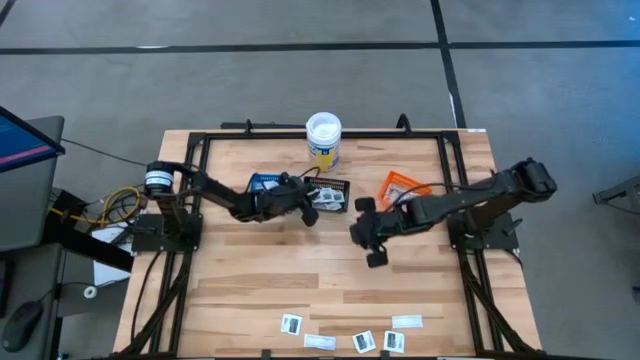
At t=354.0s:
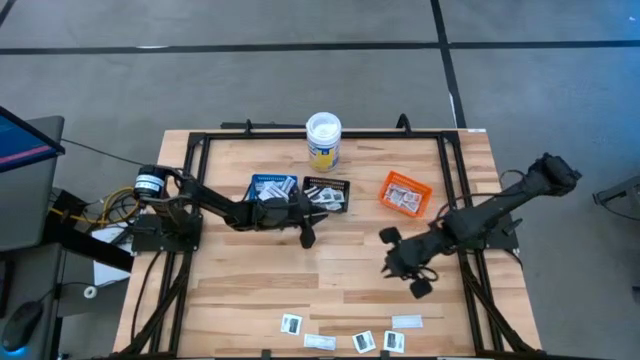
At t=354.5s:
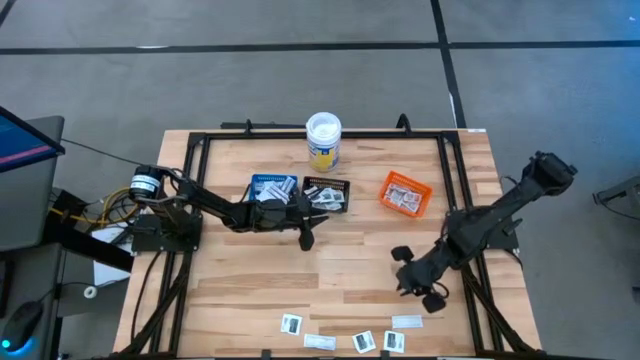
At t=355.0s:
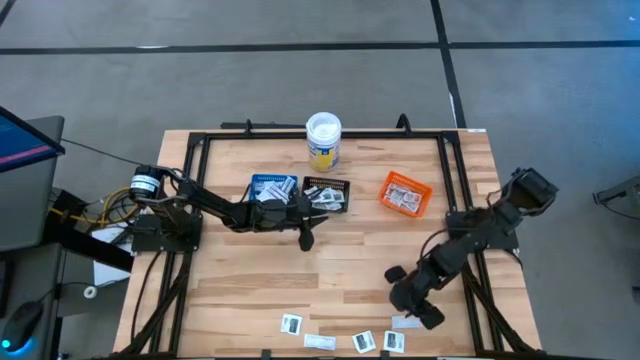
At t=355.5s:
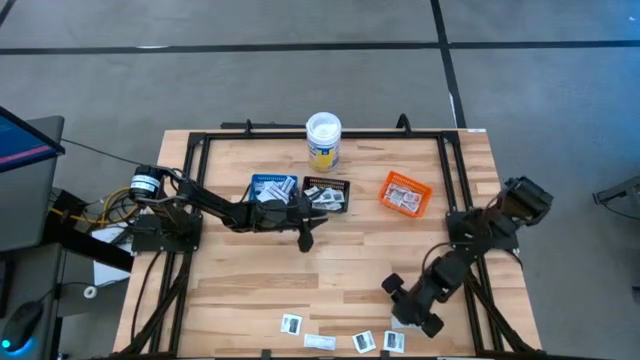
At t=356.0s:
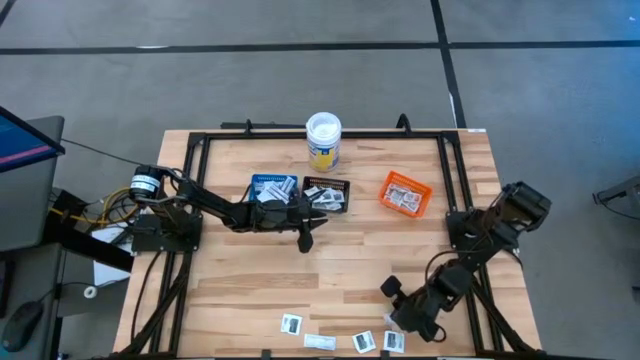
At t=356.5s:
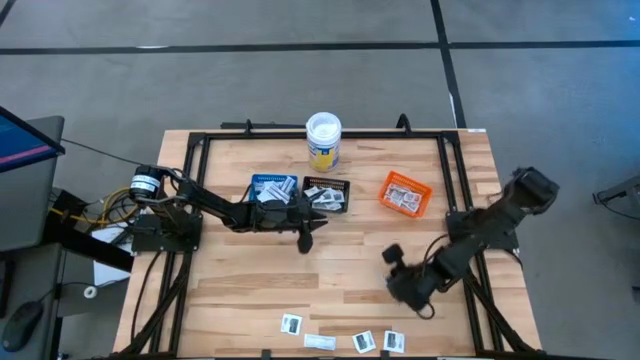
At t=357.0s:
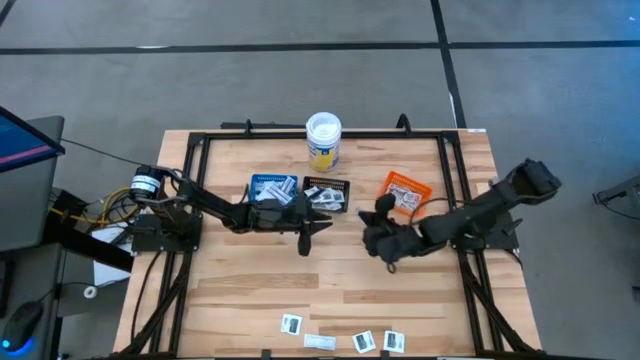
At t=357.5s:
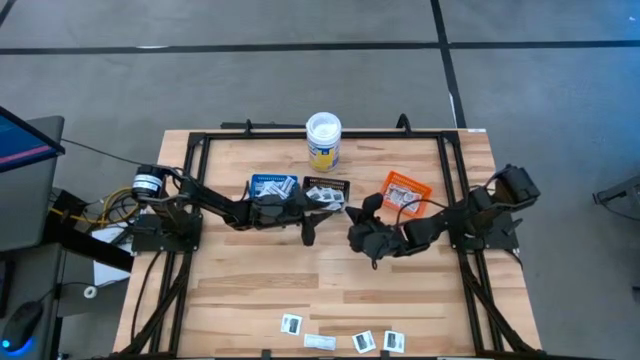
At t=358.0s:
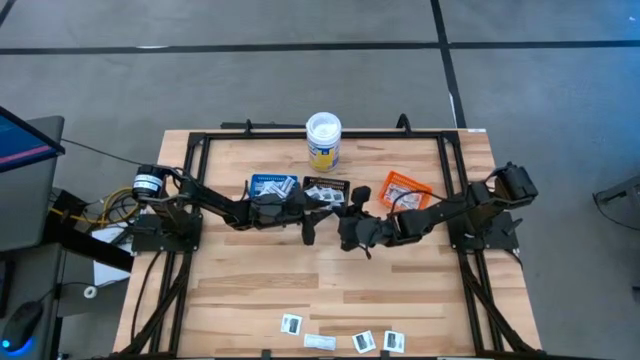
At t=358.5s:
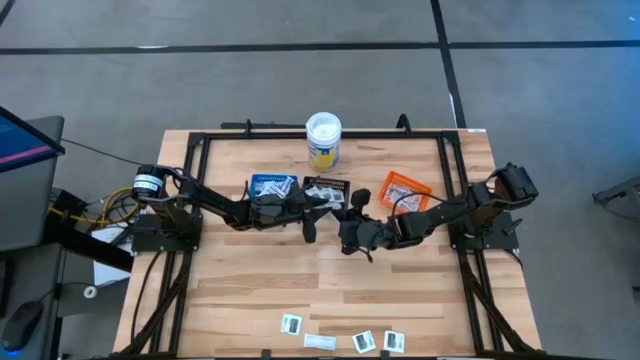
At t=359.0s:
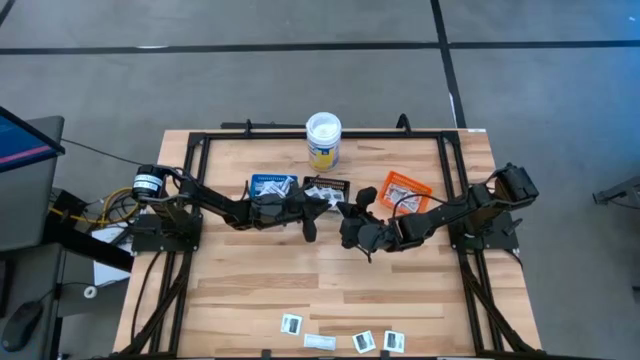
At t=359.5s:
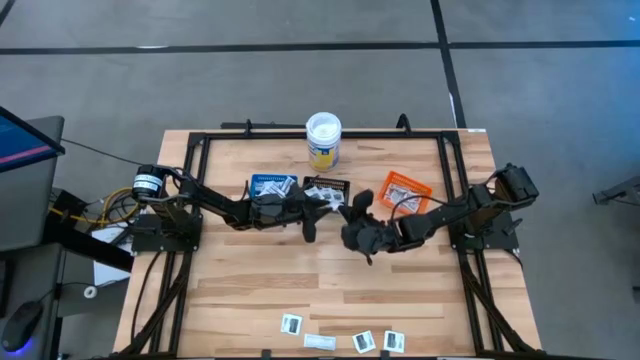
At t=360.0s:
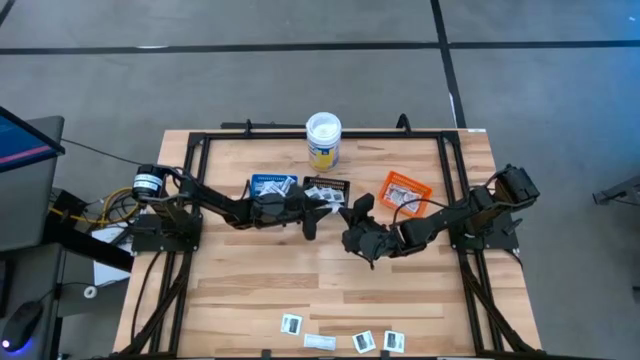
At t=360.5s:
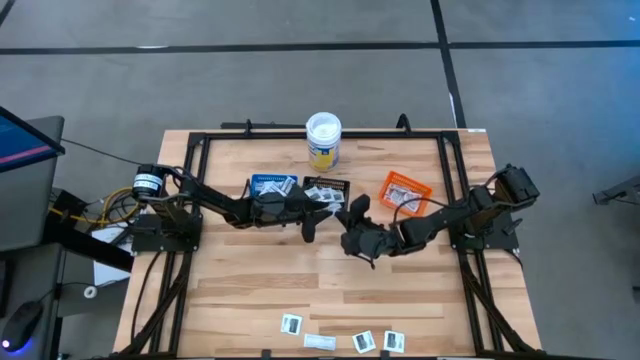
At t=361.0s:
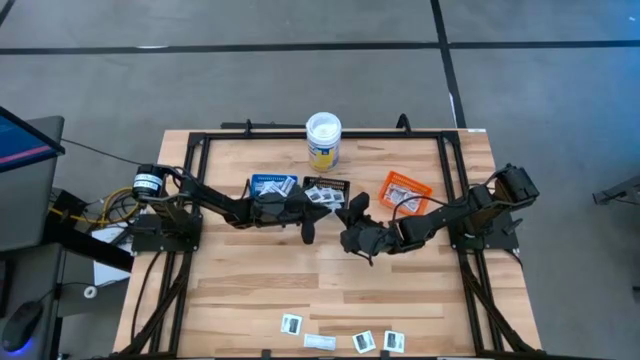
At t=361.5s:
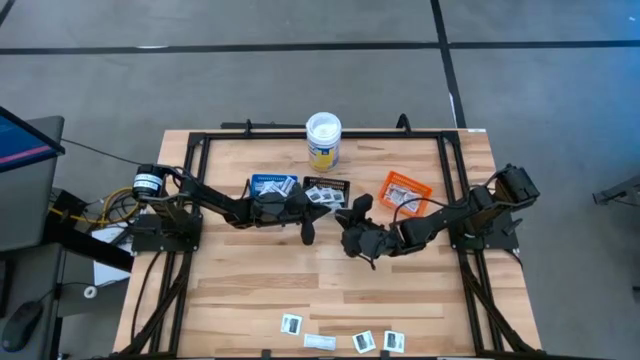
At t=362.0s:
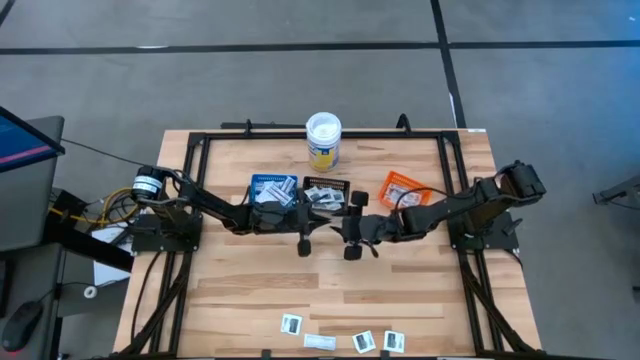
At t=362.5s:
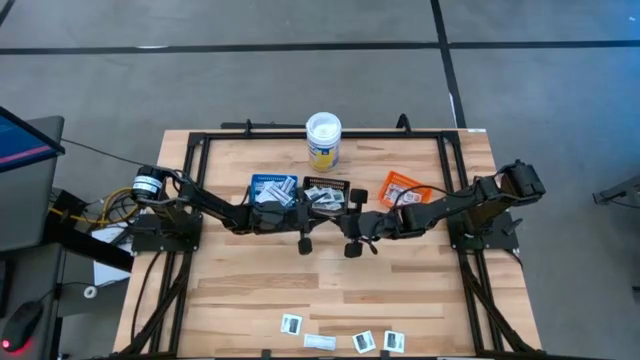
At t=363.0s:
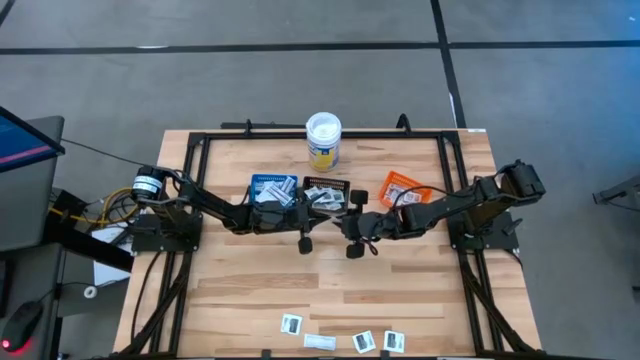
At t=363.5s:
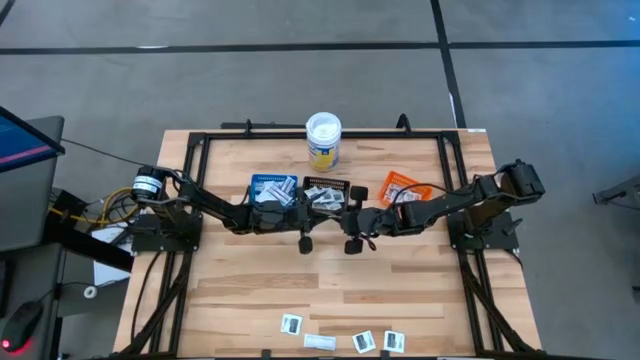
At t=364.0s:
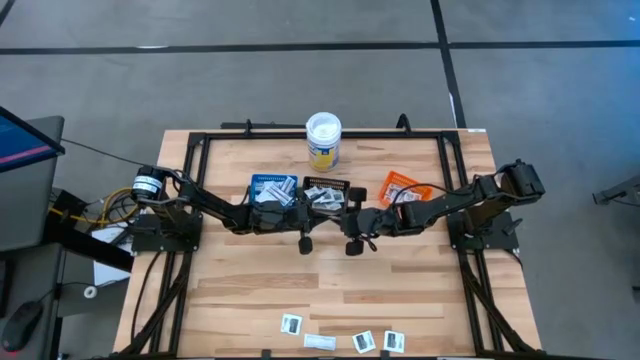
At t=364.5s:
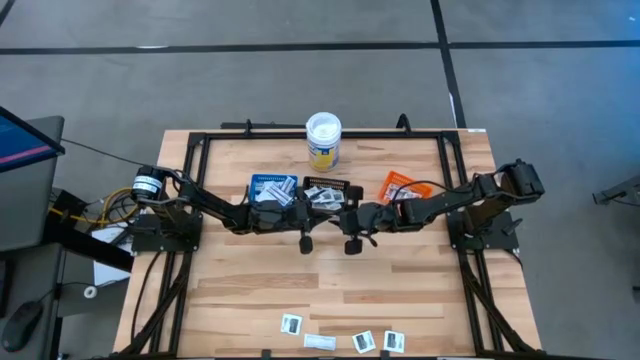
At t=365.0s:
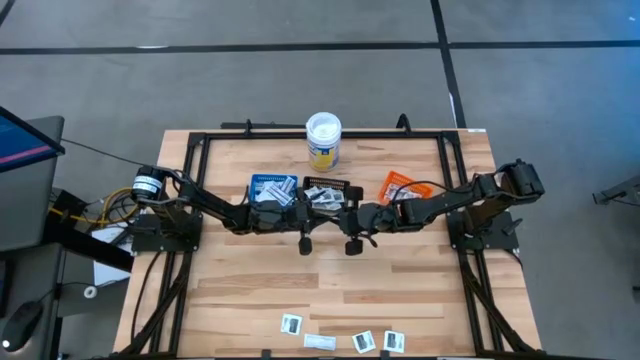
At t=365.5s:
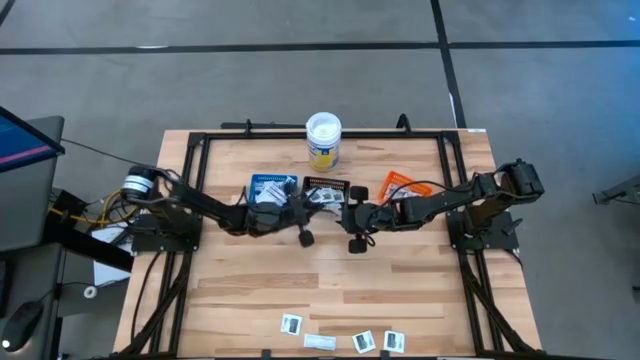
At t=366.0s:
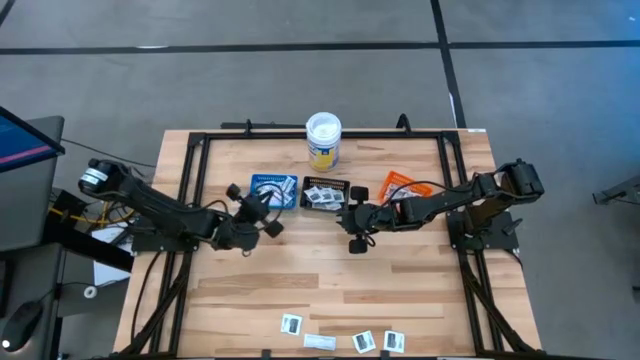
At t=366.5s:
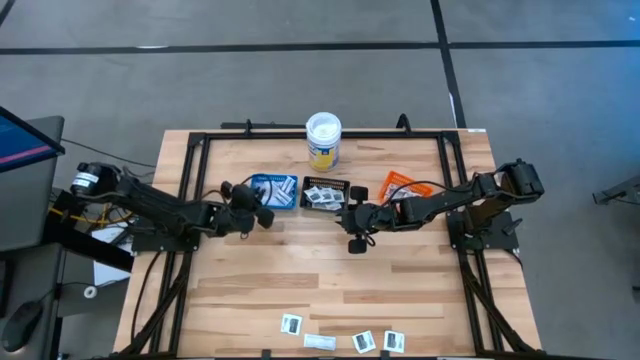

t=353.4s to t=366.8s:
Task: Pick & Place First Aid Supplies
Put the blue bandage into the blue bin

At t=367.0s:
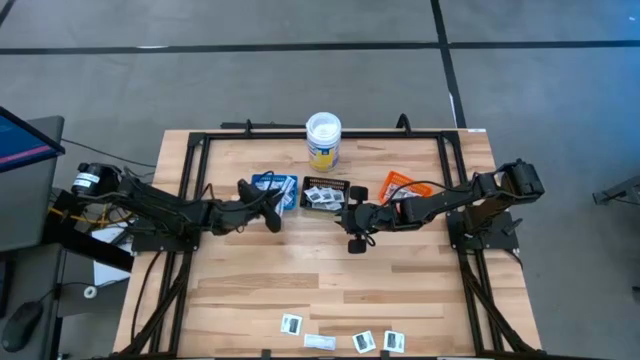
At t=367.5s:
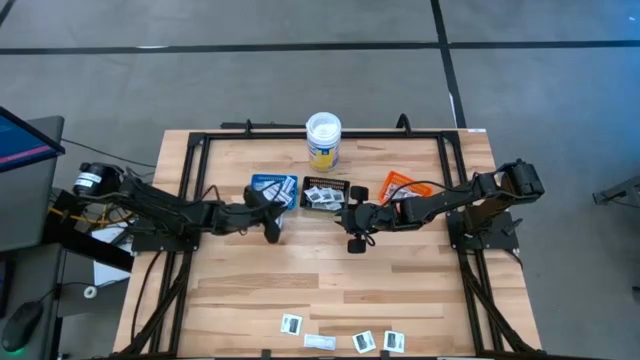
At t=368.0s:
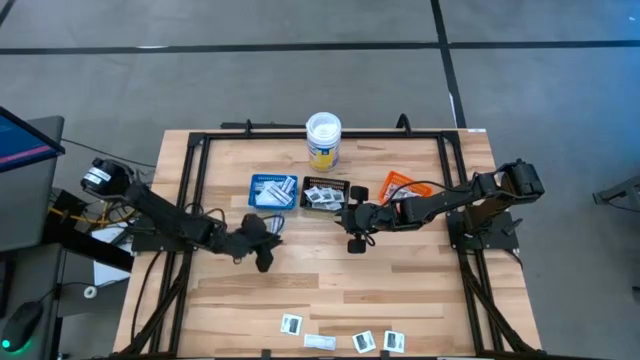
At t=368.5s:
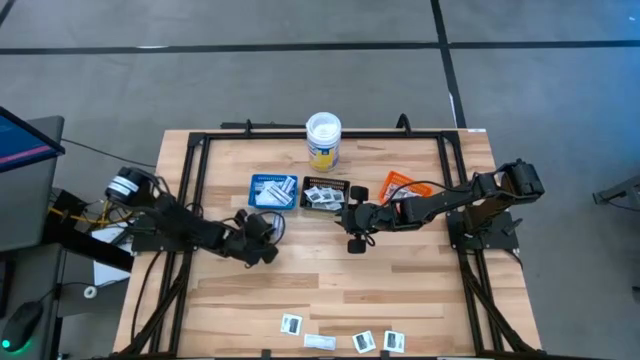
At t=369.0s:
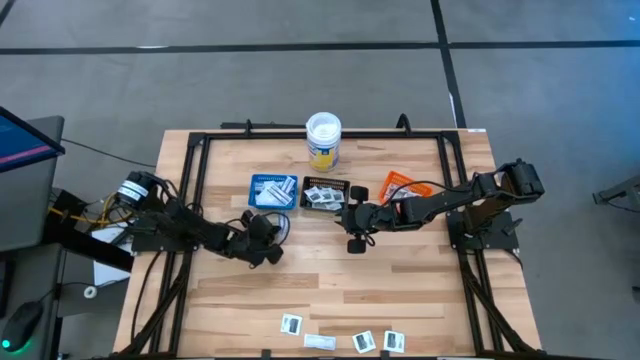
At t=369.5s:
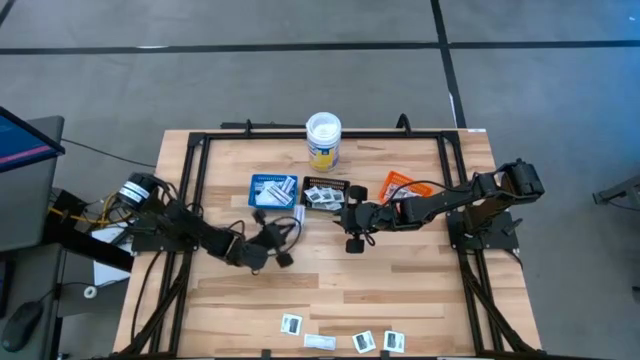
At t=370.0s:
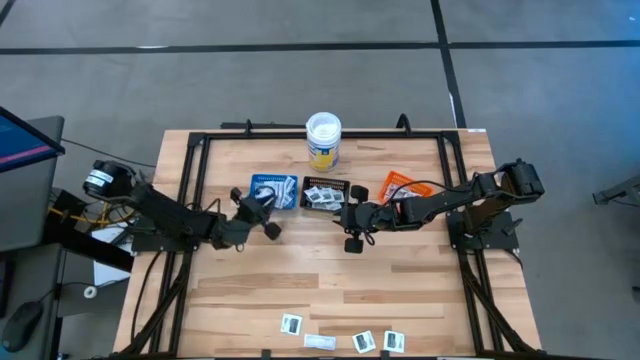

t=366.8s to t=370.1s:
Put the blue bandage into the blue bin

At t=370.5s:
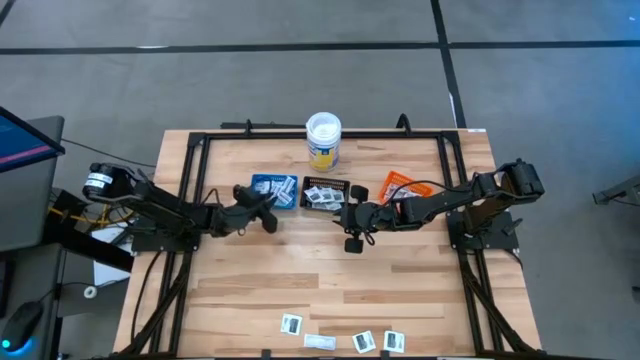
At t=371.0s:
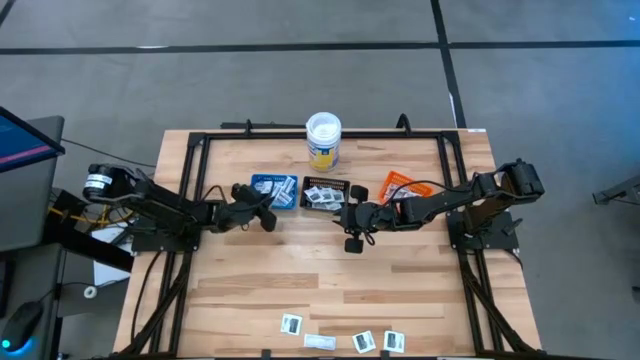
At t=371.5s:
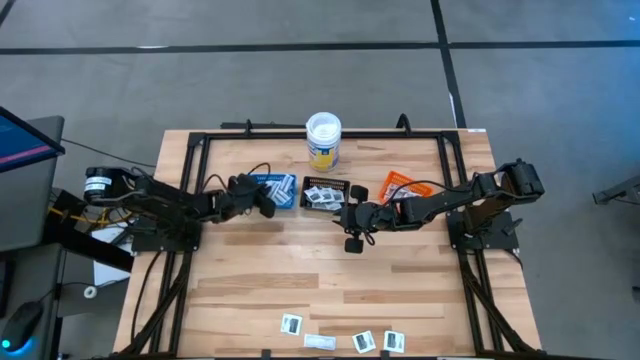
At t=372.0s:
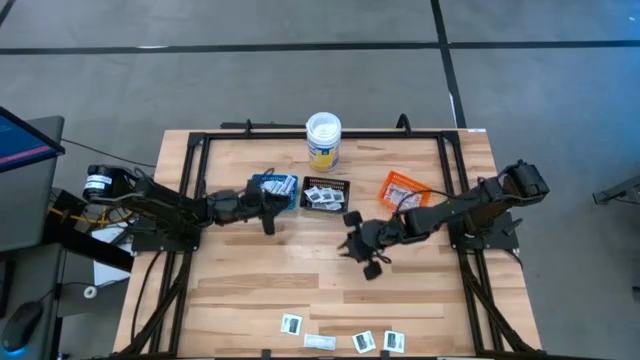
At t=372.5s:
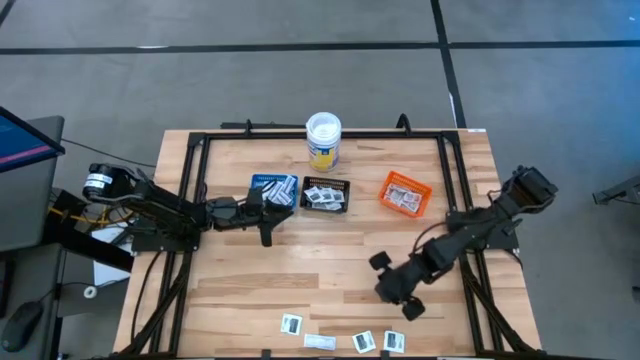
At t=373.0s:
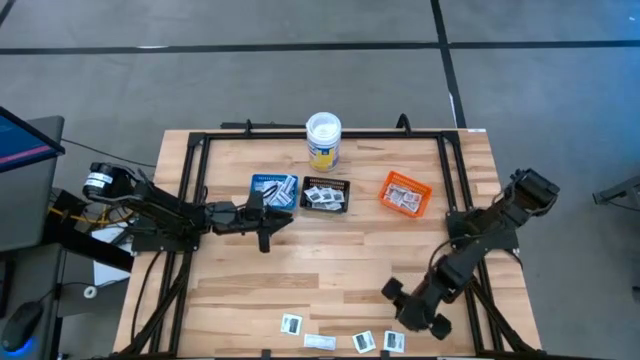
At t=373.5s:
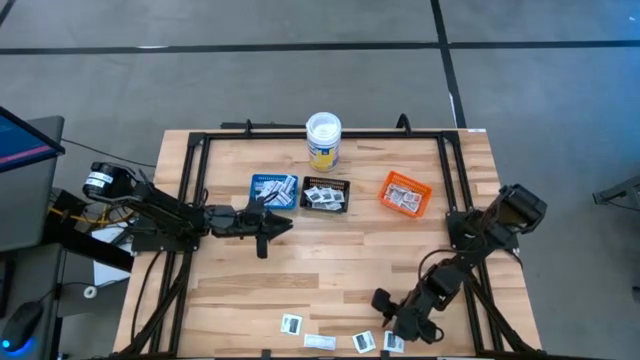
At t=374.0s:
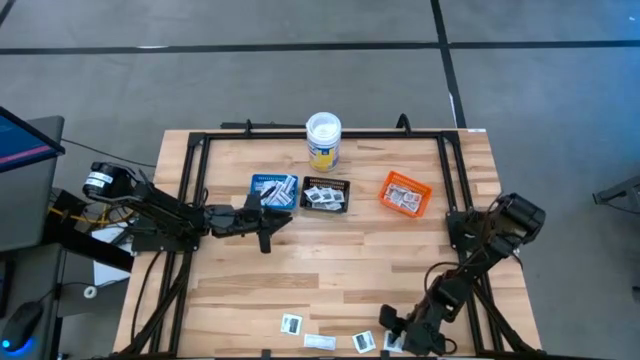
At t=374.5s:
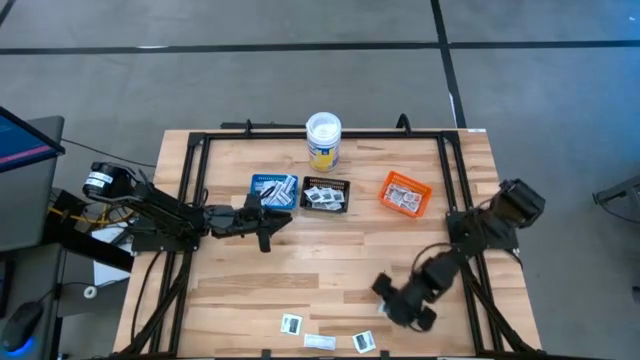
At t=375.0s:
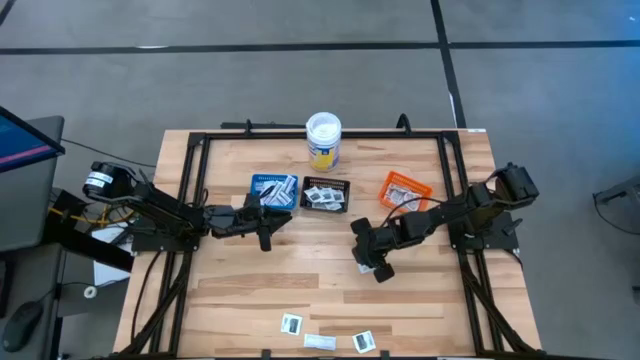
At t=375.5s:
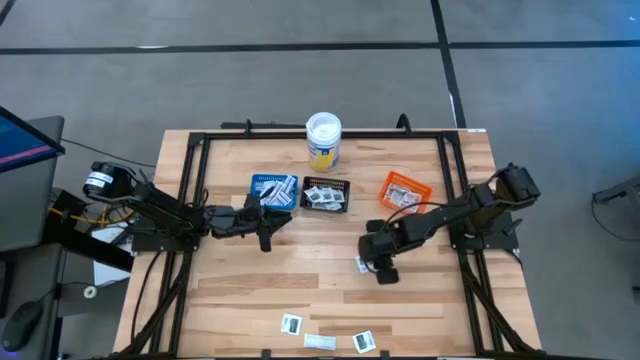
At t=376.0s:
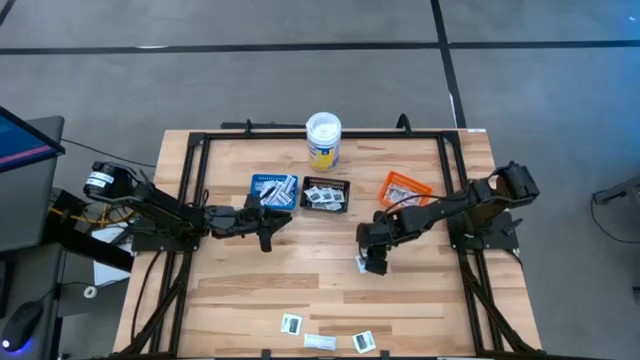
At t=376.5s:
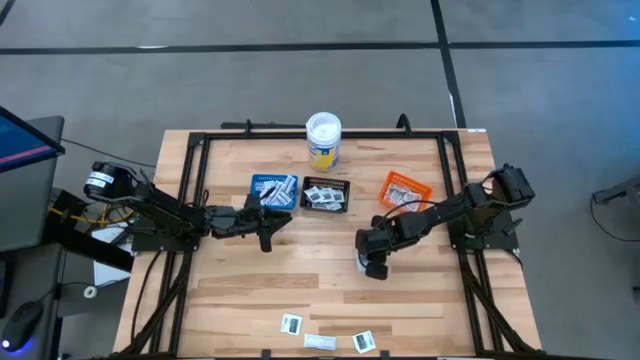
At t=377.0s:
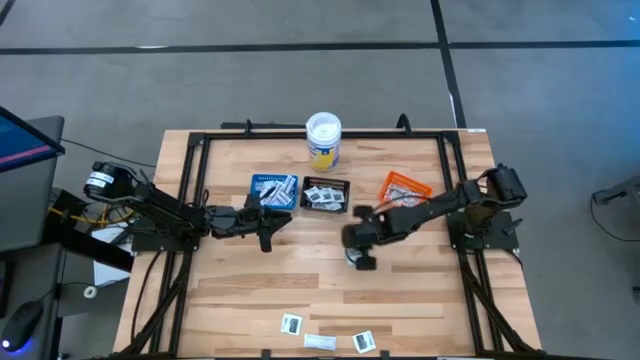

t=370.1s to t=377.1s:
Put the black towelette pack into the black bin
